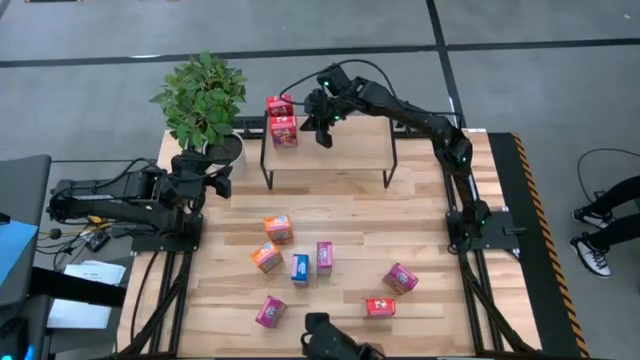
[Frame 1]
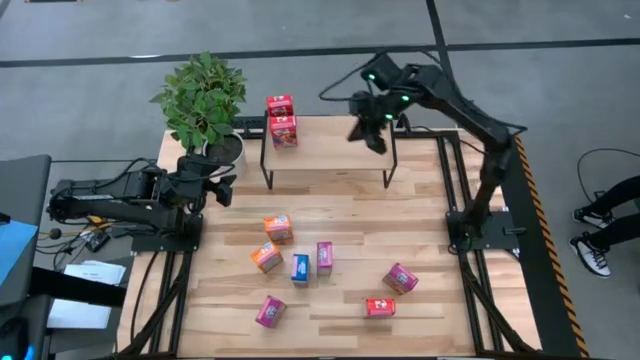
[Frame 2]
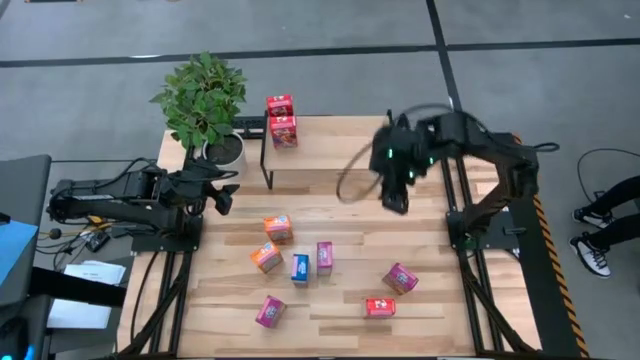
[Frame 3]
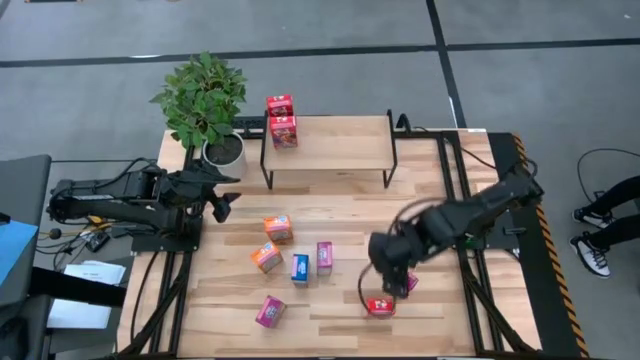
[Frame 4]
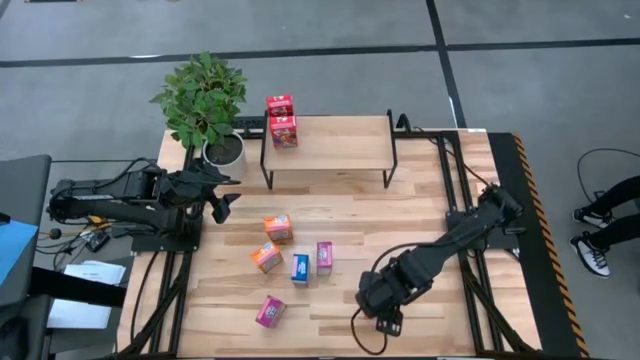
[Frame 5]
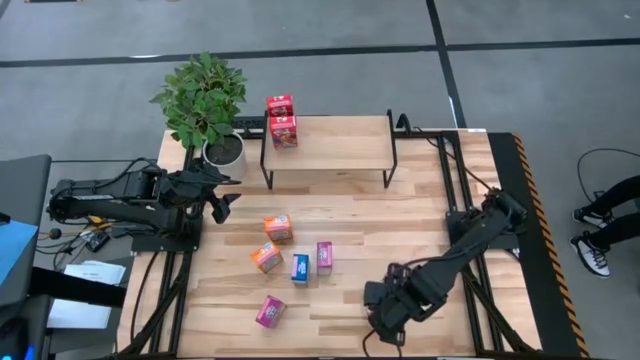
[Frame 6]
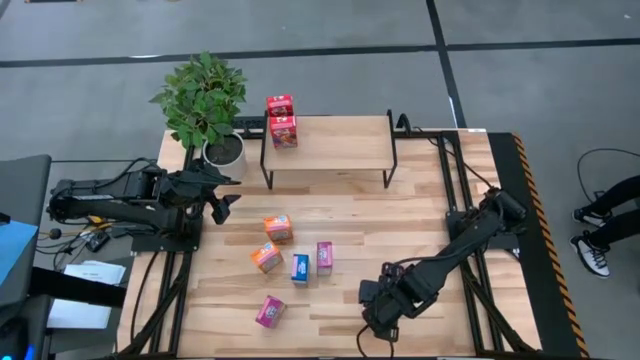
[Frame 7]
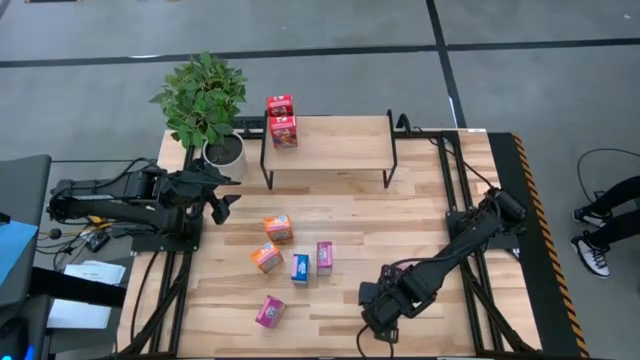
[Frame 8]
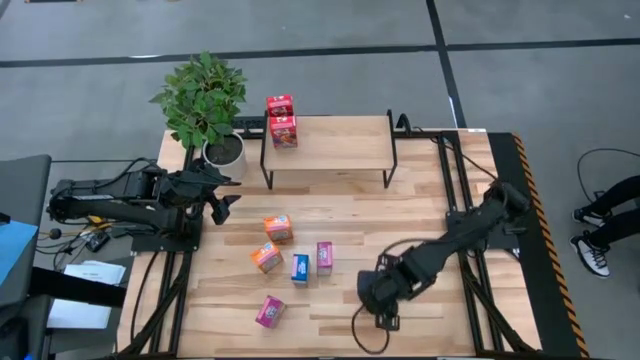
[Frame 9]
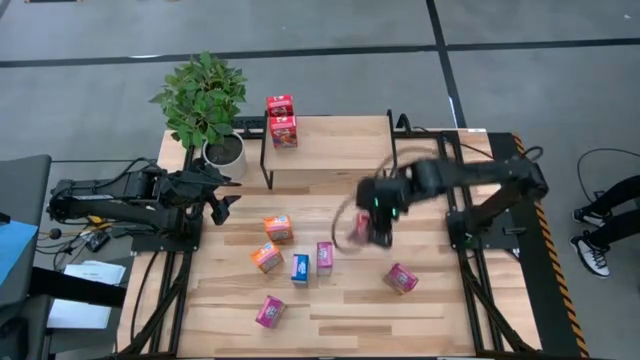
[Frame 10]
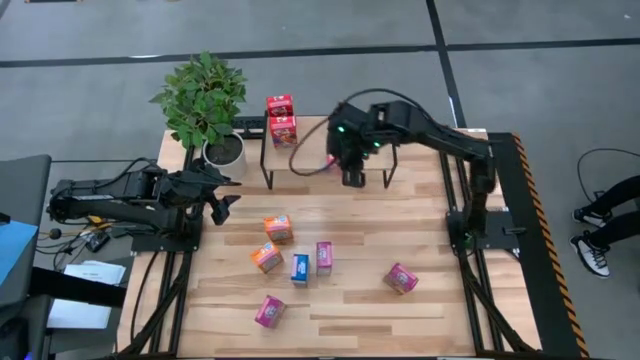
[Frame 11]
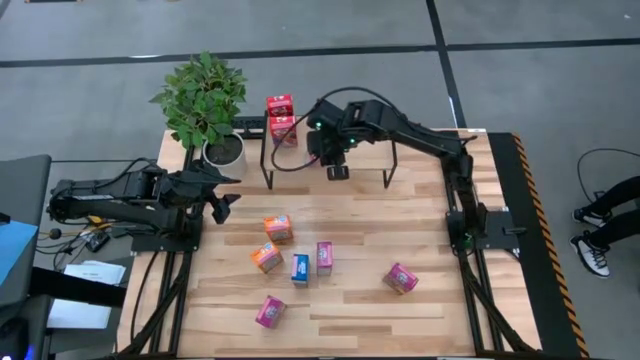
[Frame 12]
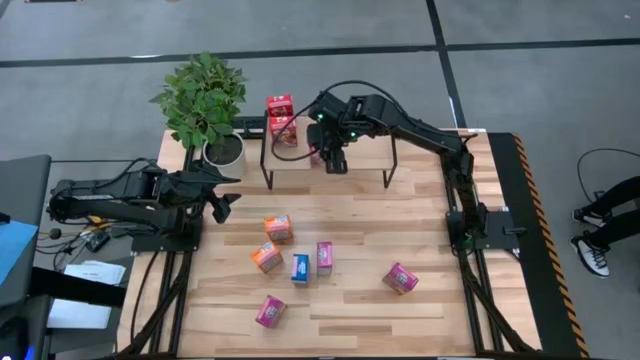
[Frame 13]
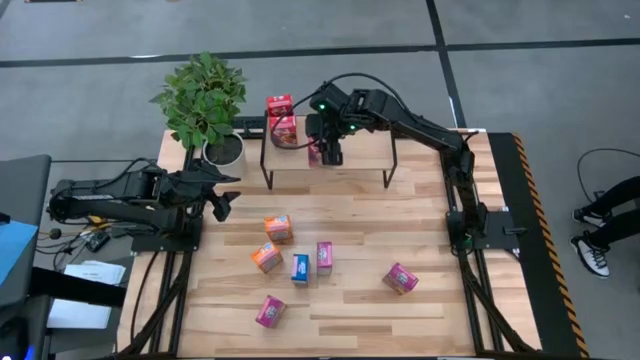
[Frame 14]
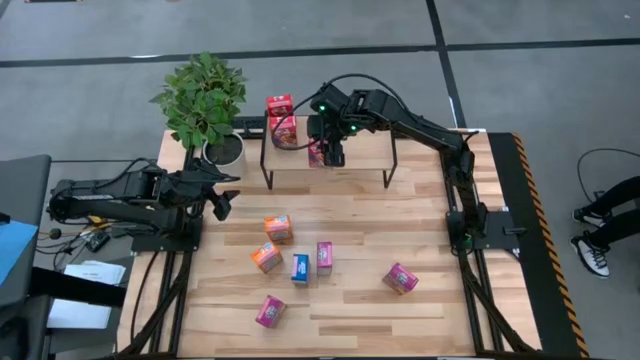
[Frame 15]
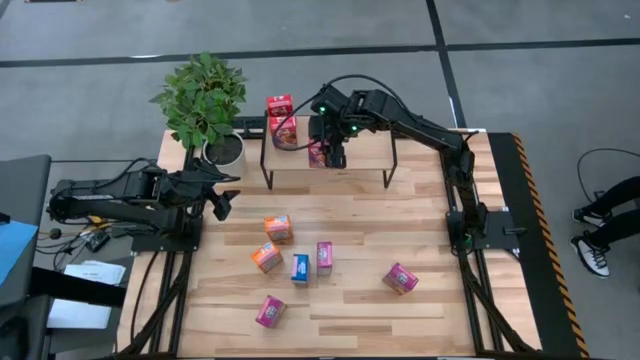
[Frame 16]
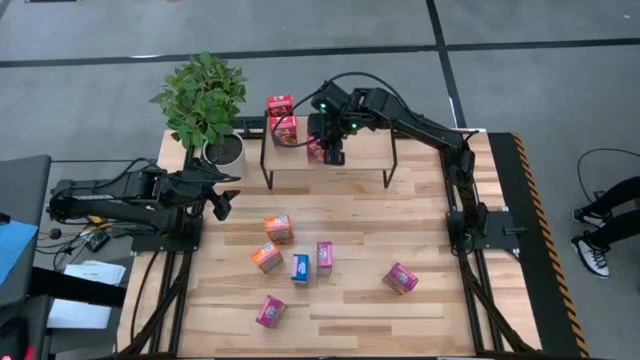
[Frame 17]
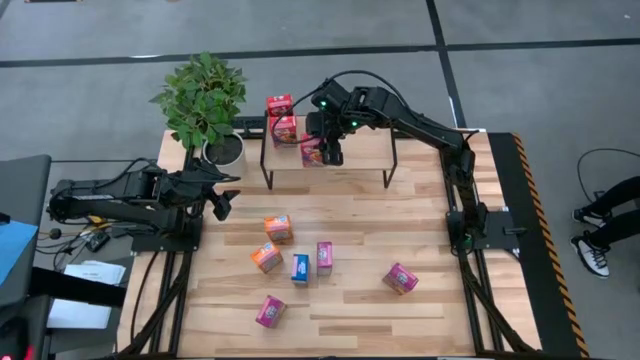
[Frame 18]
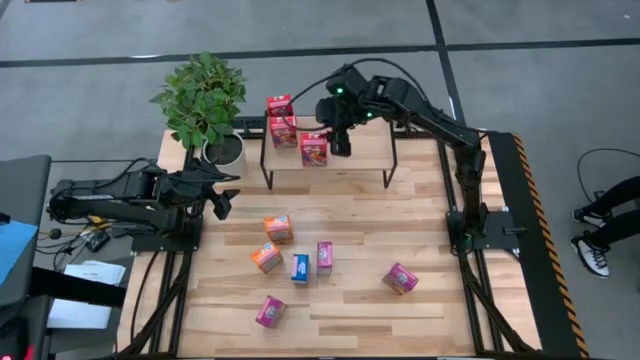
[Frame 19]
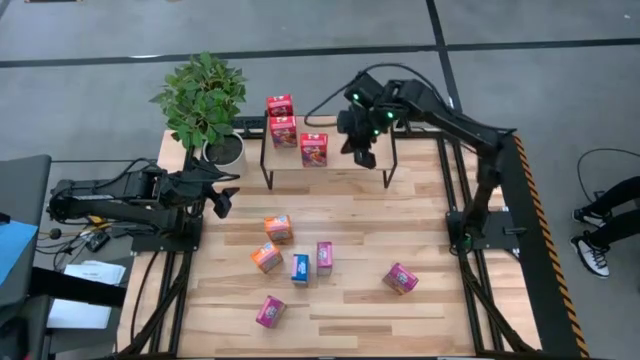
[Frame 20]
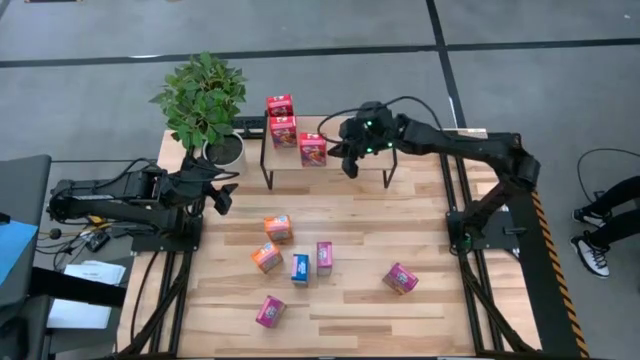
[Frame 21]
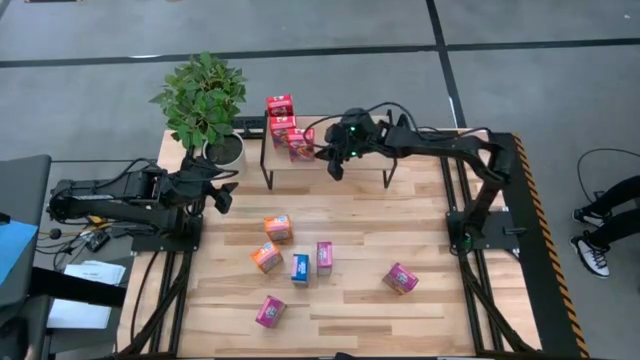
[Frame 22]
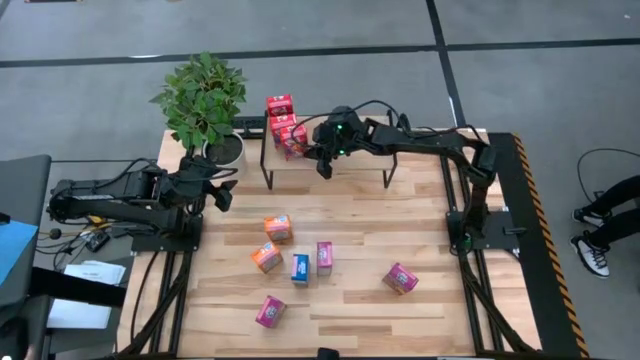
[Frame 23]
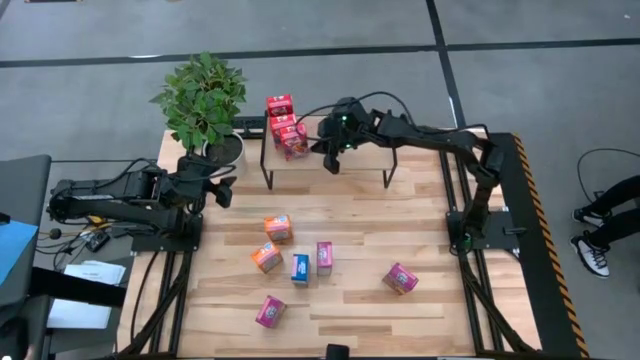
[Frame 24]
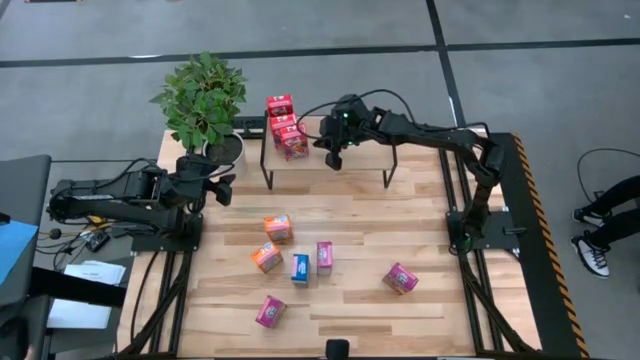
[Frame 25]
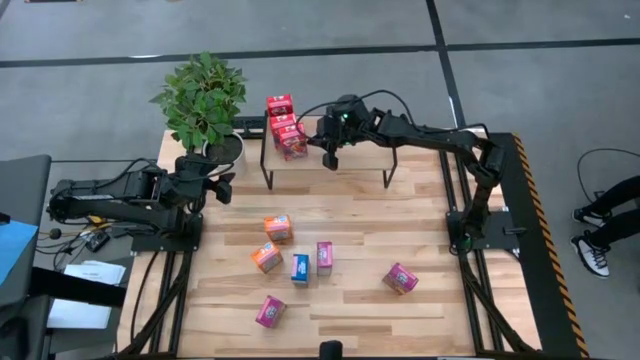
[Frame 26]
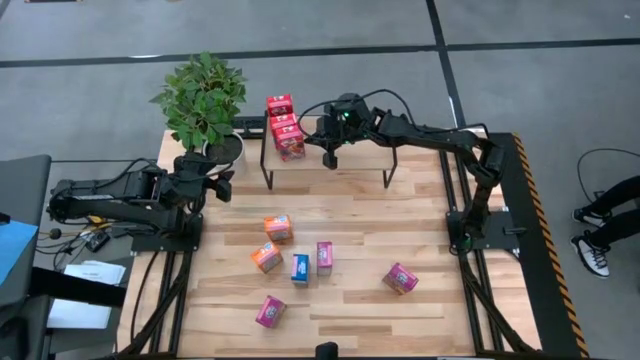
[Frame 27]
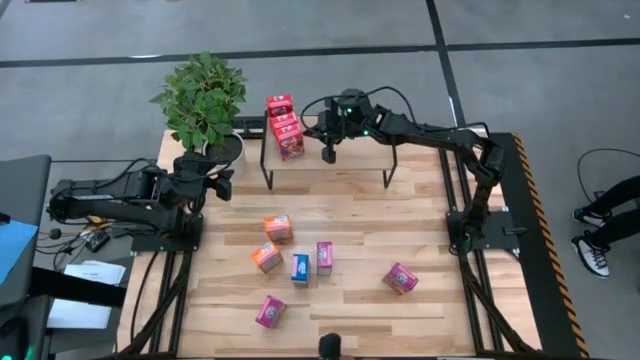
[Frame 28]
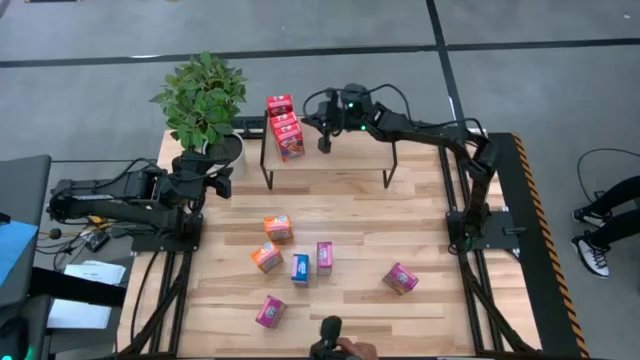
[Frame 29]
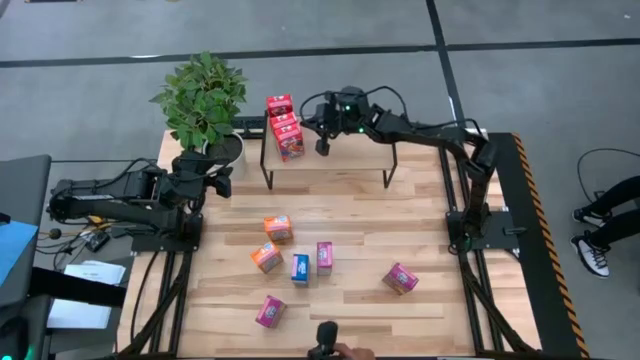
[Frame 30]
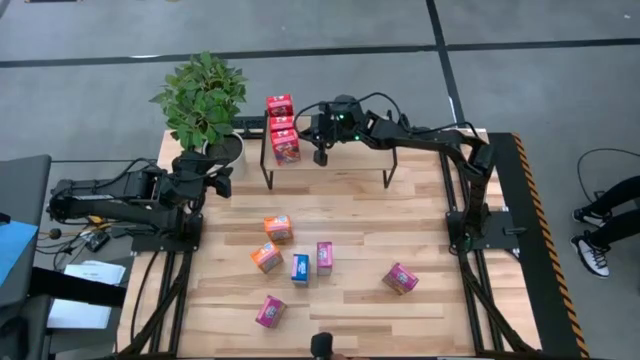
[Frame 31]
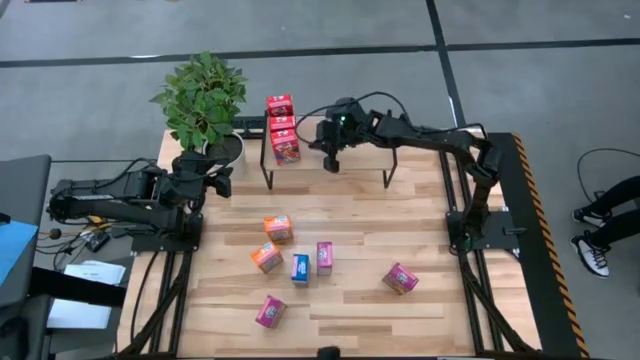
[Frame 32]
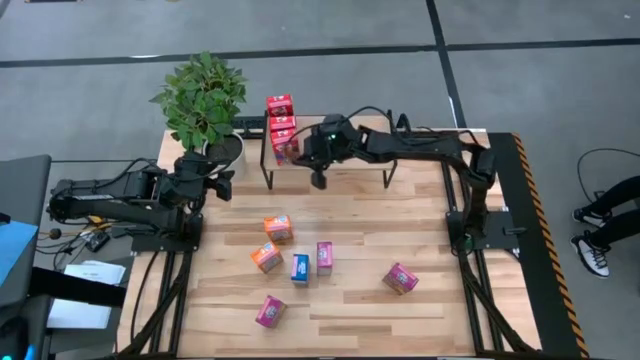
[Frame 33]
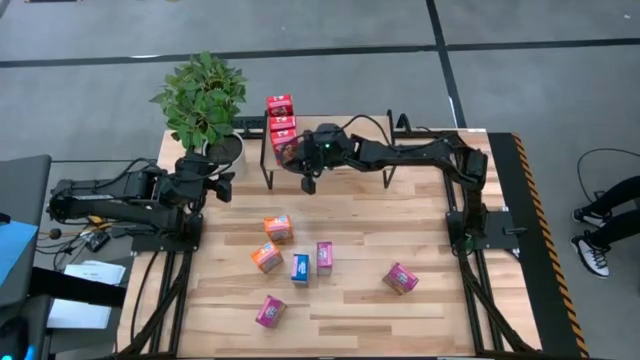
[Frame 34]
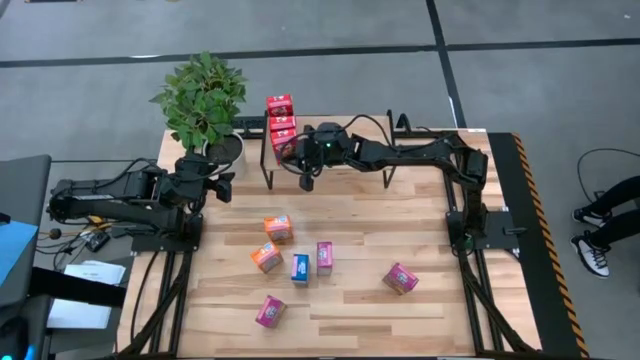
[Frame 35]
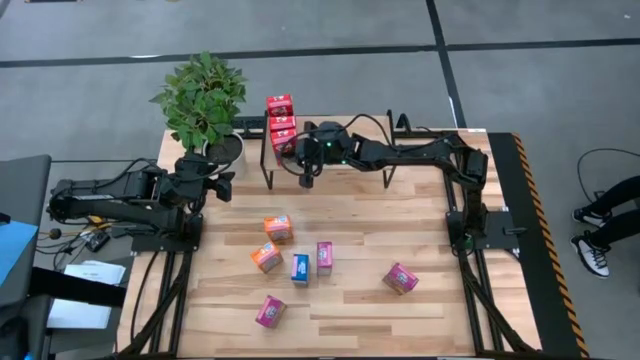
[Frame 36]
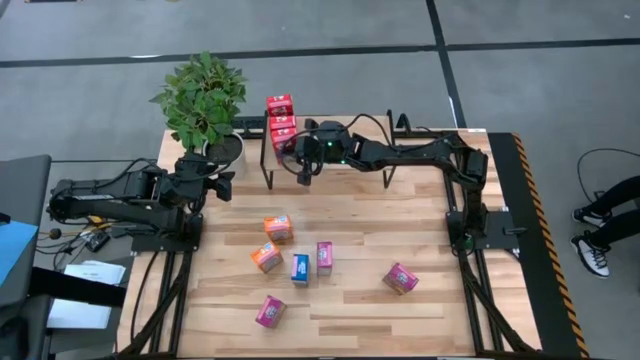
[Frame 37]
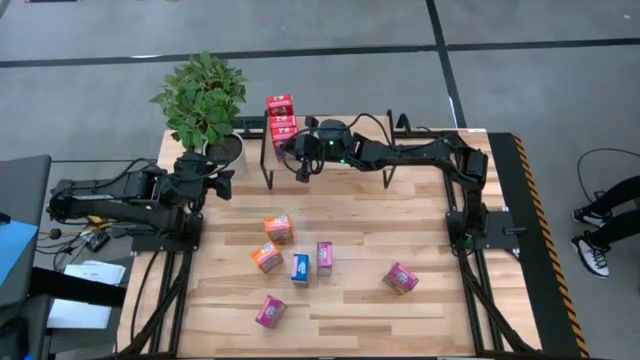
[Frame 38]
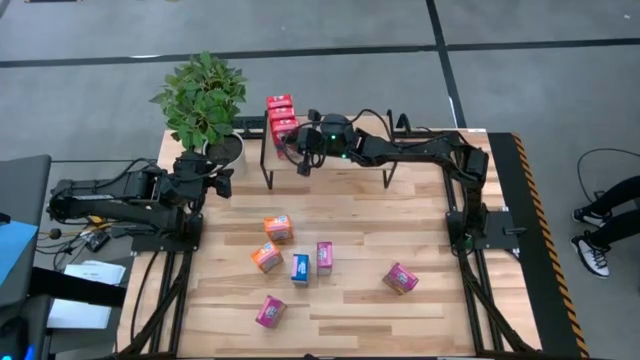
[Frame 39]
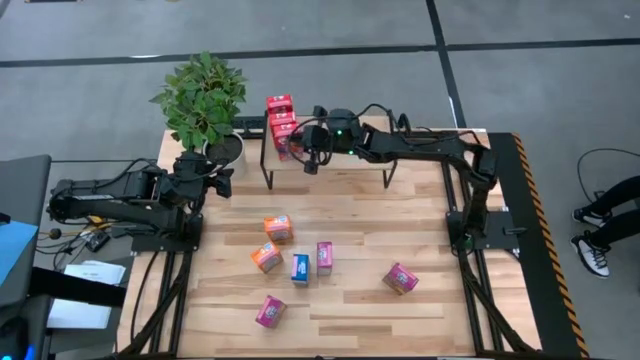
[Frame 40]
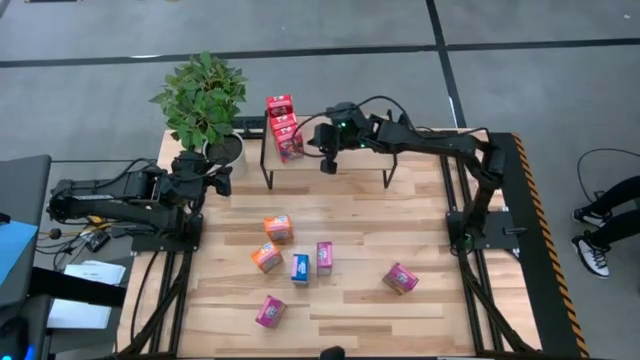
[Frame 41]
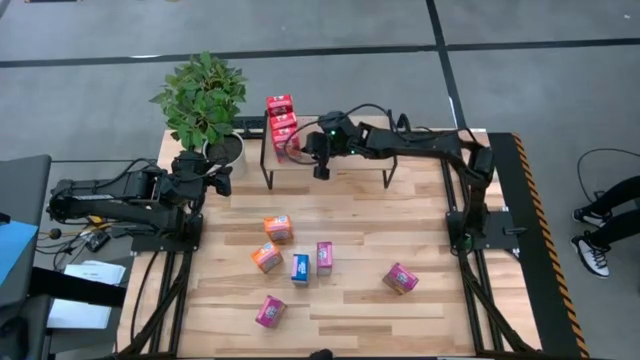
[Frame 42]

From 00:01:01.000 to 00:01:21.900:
Task: Stack cereal on shelf
Put the red cereal box on the shelf aligned with the other red cereal box on the shelf
